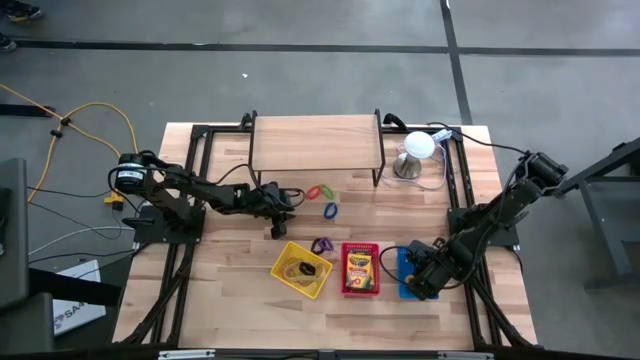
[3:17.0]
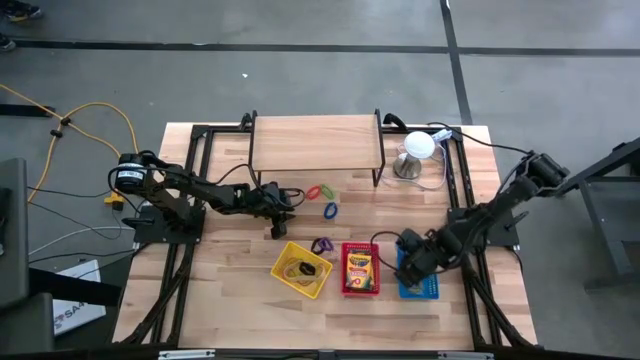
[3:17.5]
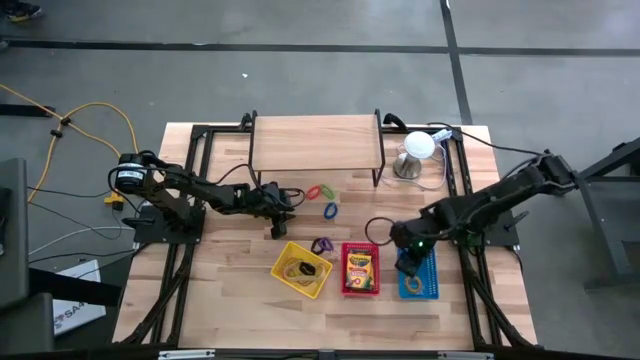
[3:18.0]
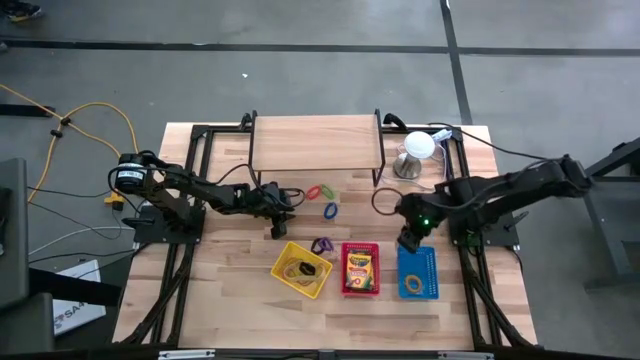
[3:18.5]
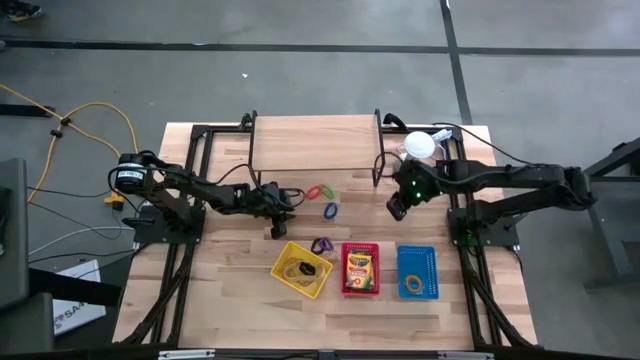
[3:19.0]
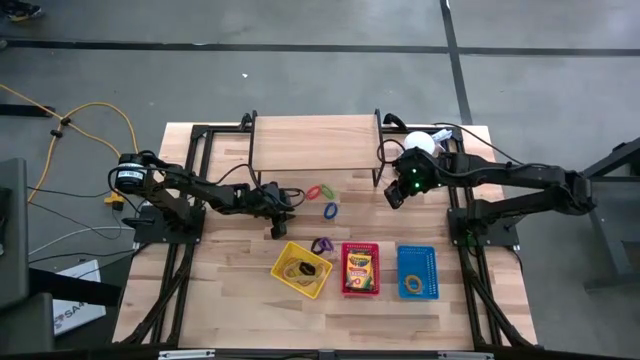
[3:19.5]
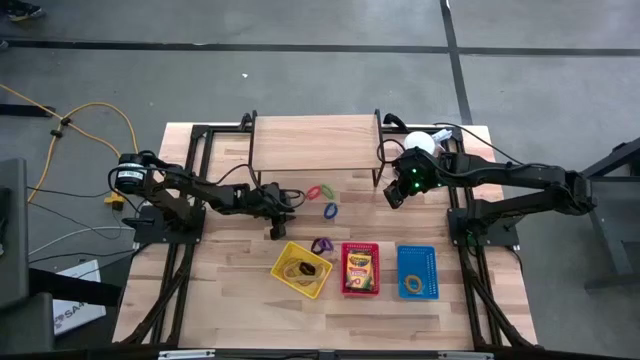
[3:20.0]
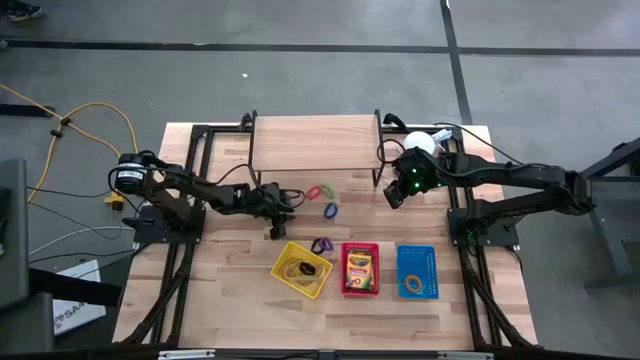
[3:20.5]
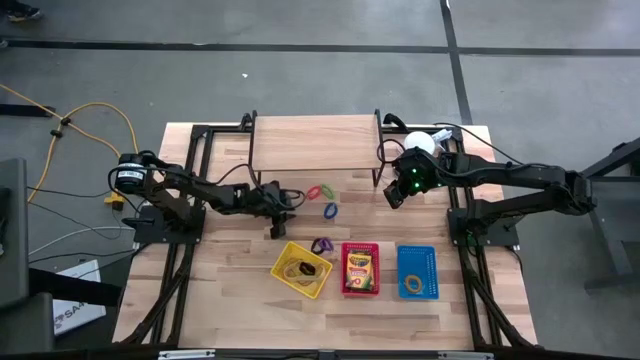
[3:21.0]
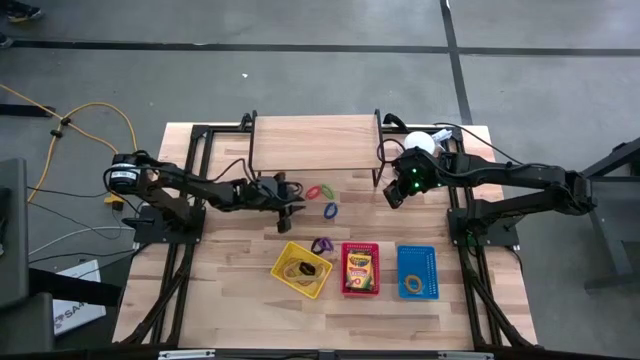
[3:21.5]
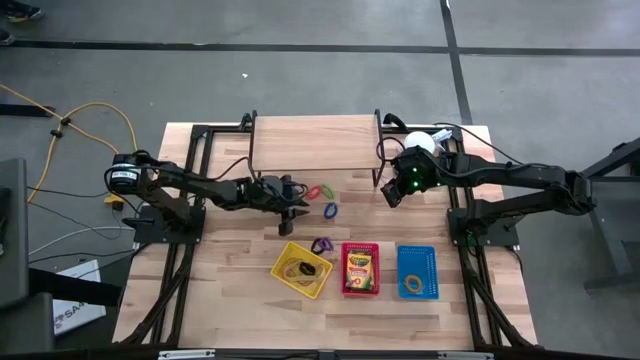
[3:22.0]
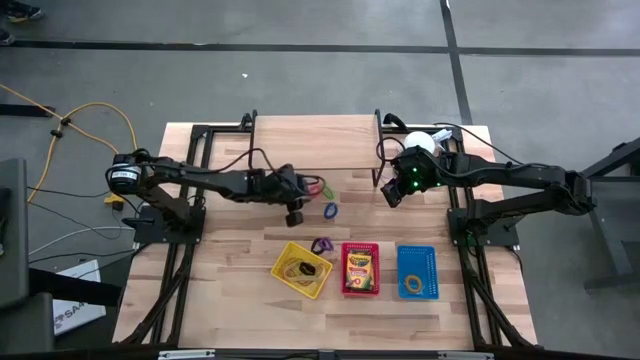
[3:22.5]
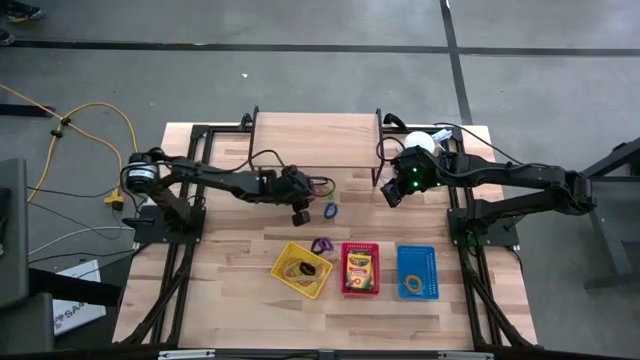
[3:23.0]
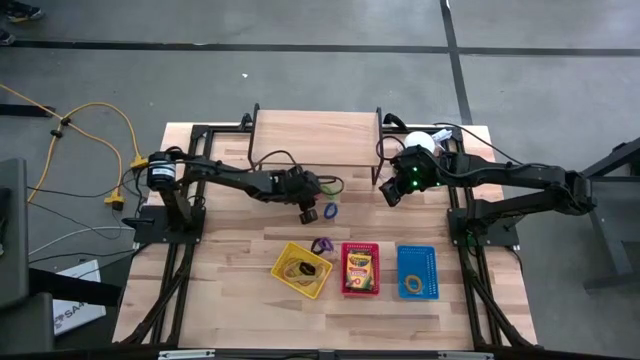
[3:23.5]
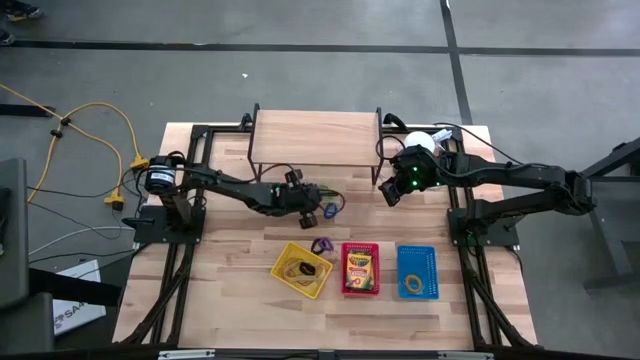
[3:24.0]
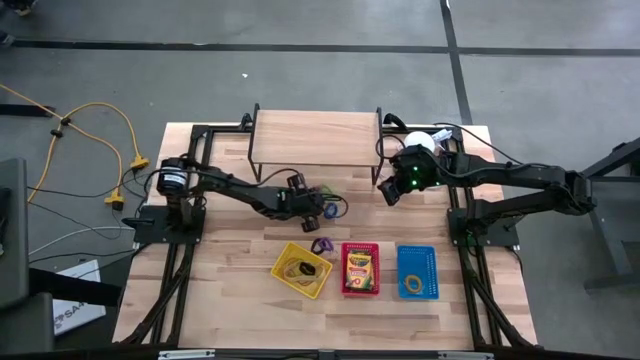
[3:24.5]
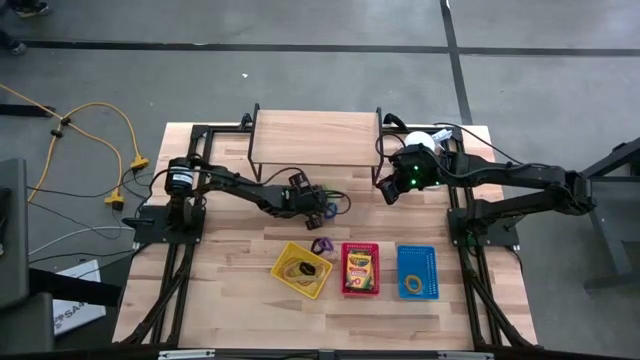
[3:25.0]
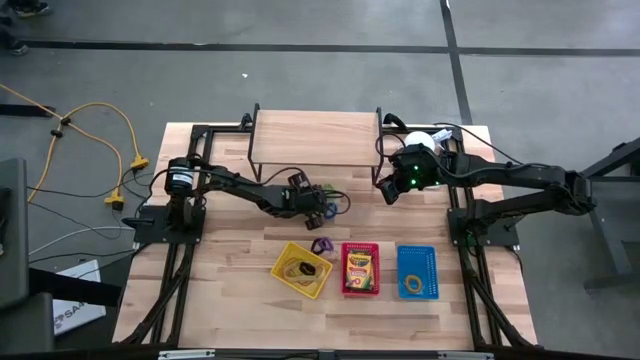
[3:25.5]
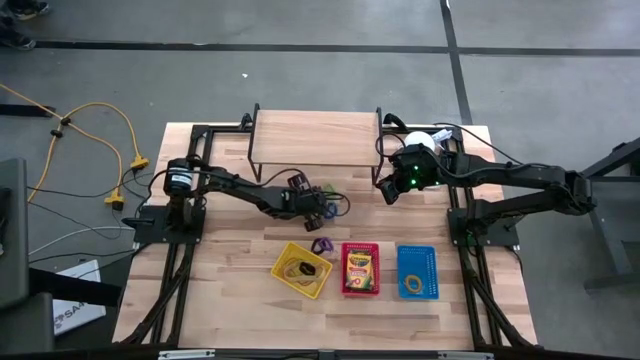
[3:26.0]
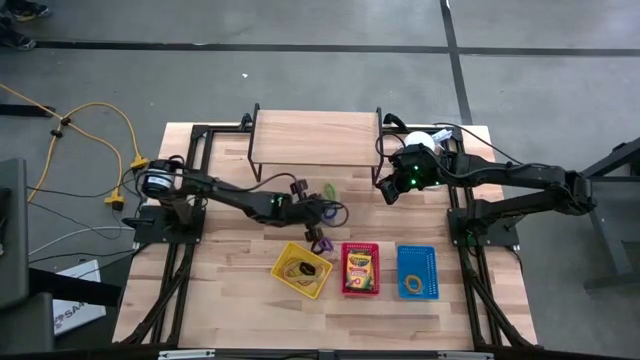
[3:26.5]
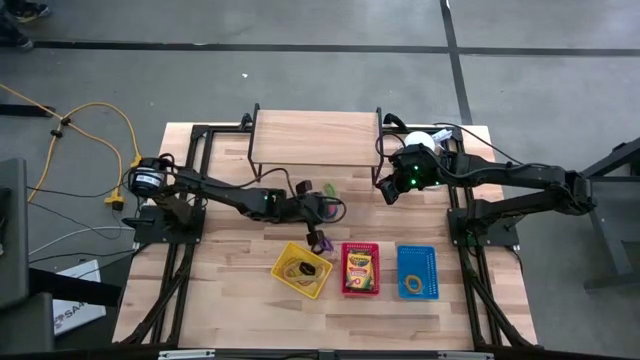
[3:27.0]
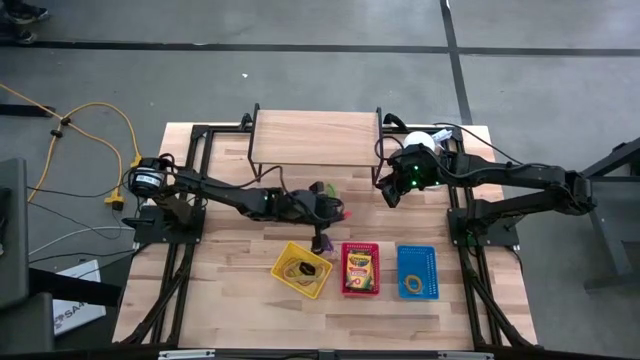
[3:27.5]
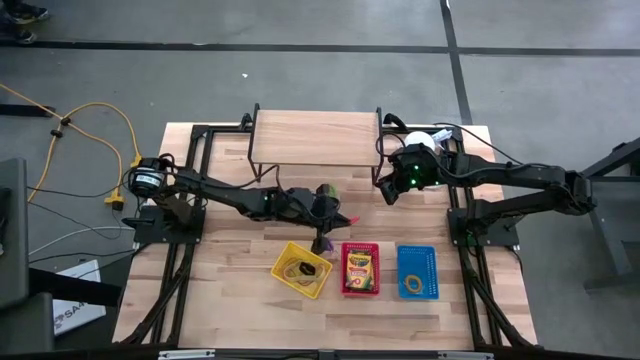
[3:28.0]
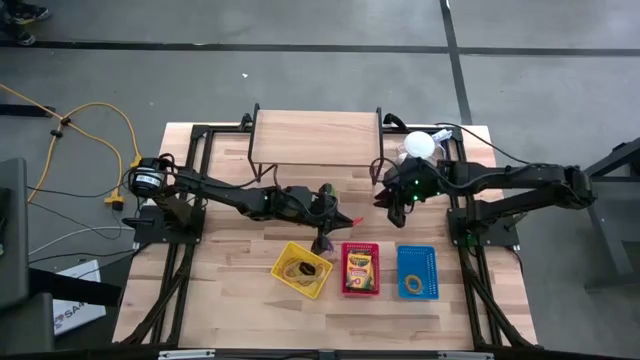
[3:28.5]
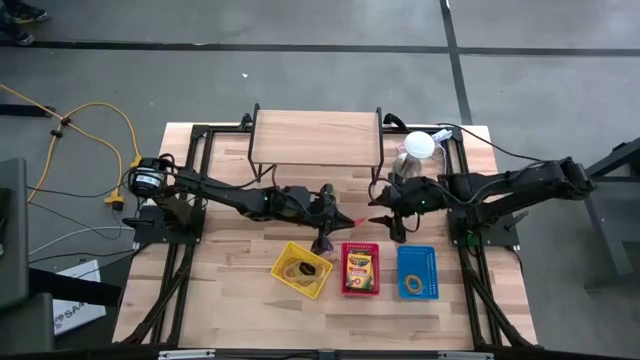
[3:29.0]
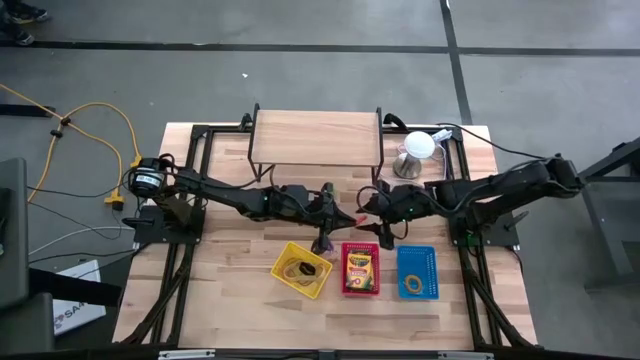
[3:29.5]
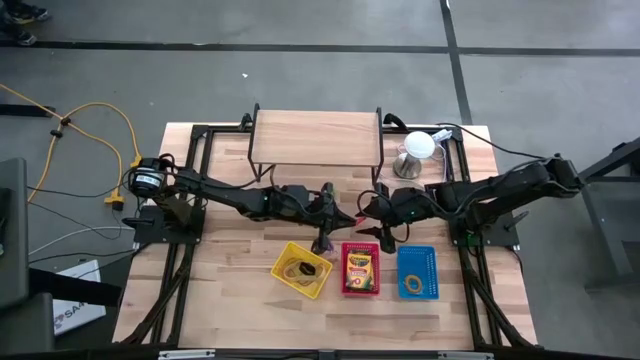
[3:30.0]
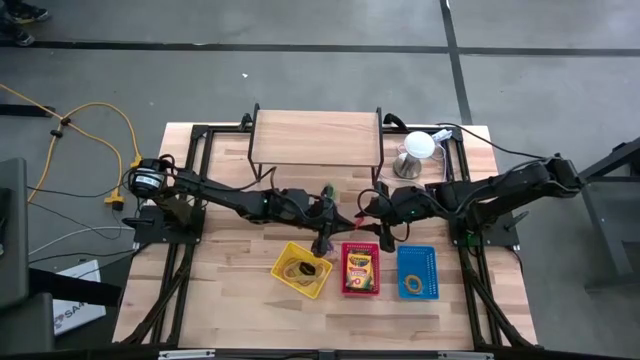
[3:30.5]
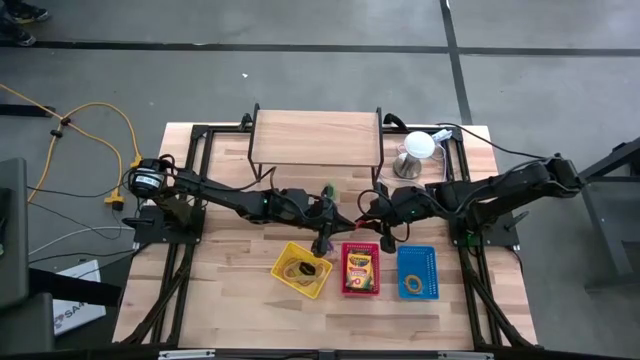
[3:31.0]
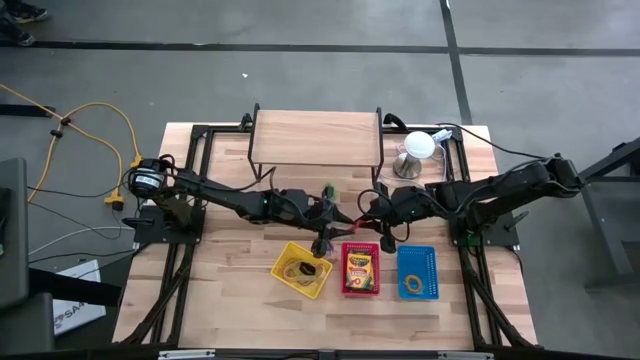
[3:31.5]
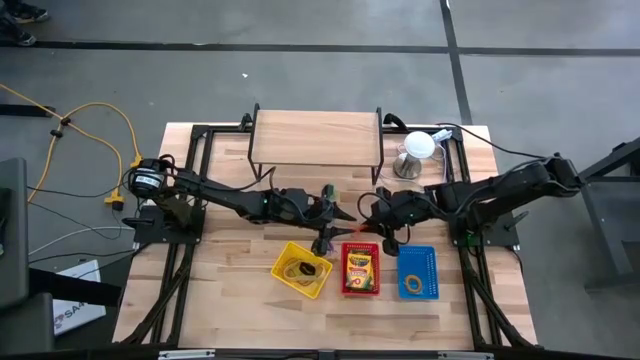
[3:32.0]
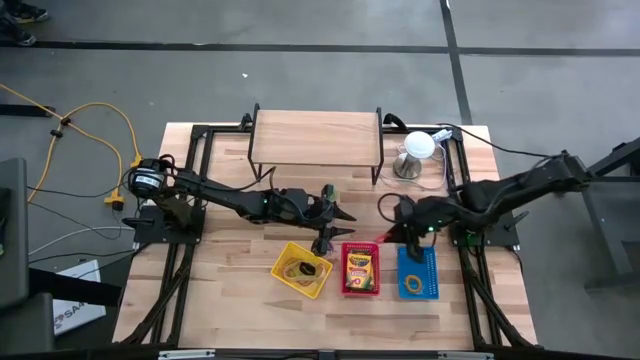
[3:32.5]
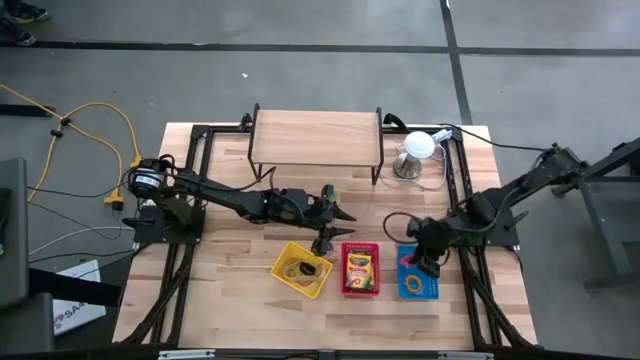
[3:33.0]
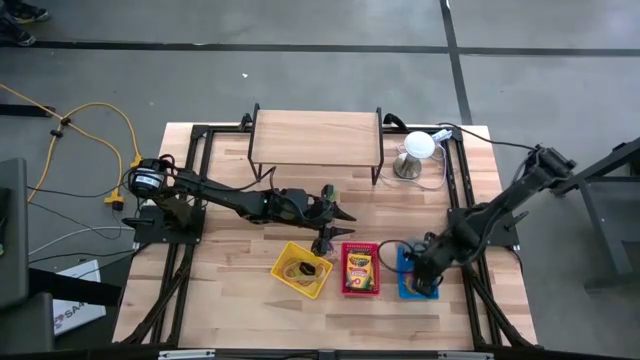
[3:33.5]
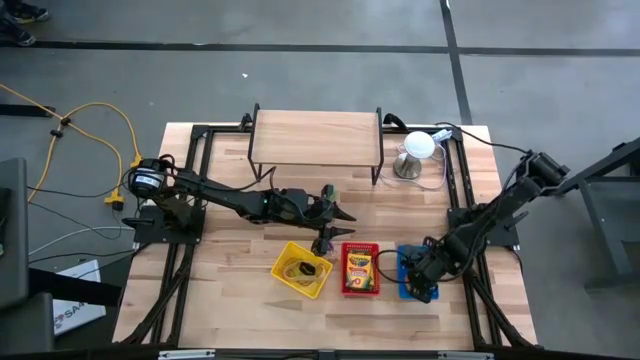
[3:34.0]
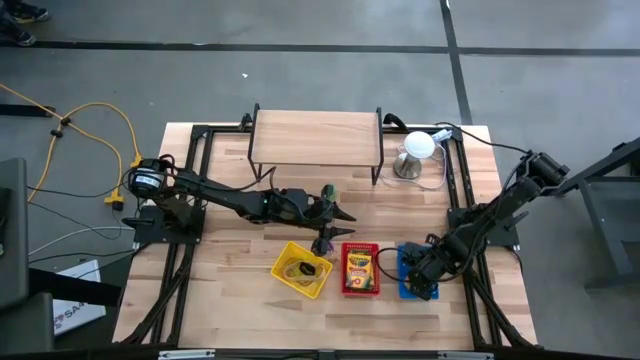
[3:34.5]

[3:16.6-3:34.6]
Task: Pick & Place Office Desk Supplies
Put the orange spring keychain into the blue bin

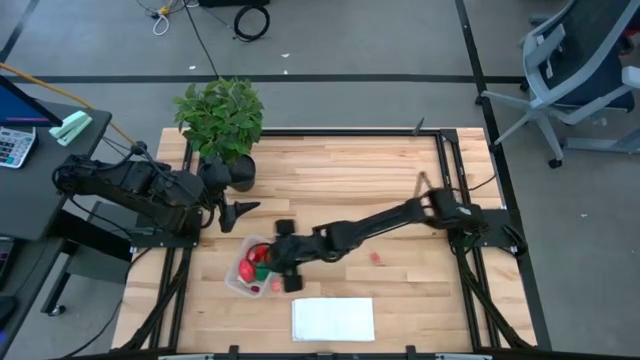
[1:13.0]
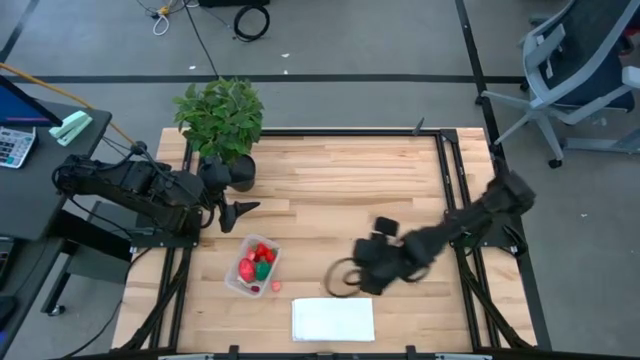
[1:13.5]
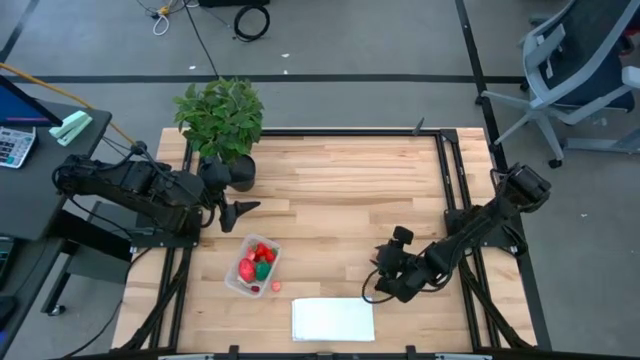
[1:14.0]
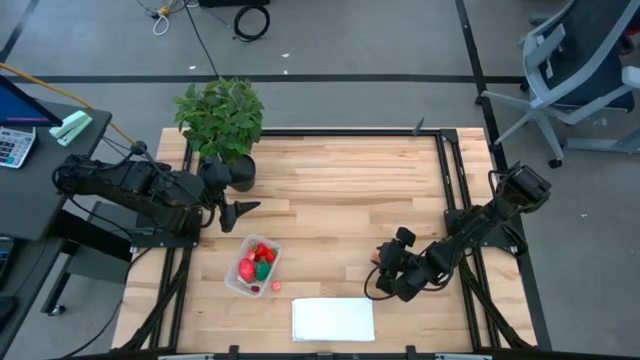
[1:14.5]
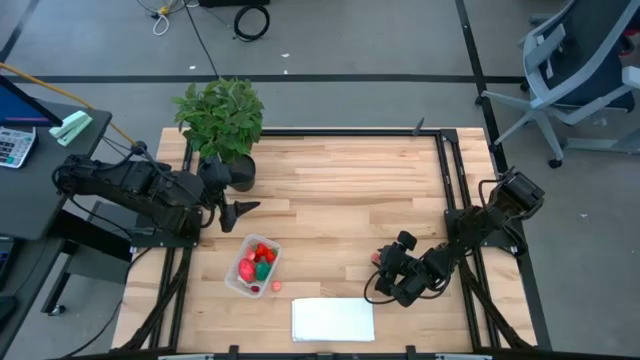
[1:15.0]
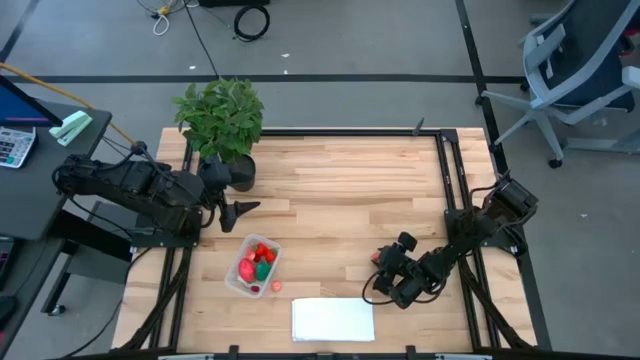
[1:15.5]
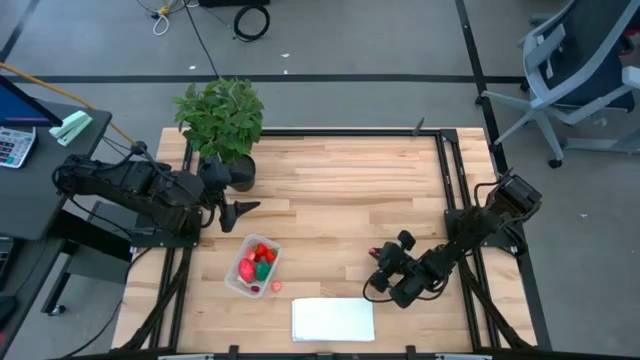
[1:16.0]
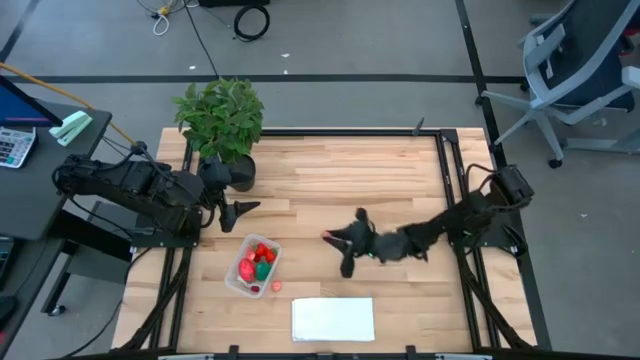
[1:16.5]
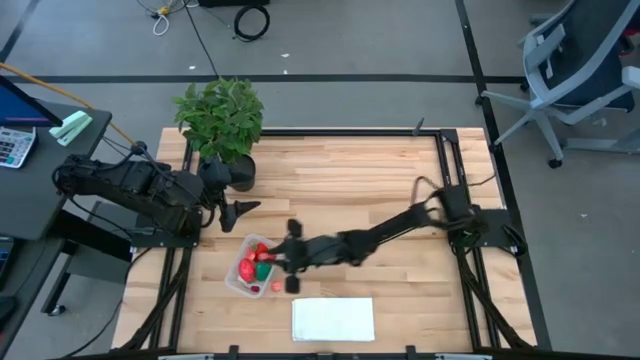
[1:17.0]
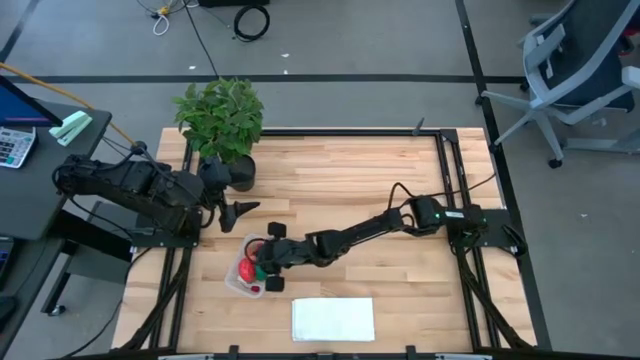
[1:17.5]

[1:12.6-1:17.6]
Task: Pick and placing Produce into tupperware
Put the pink peach into the transparent bin
